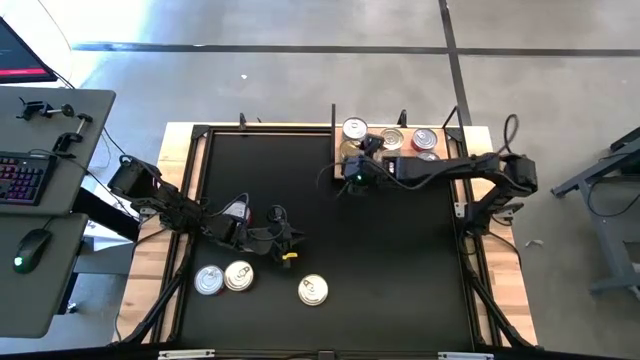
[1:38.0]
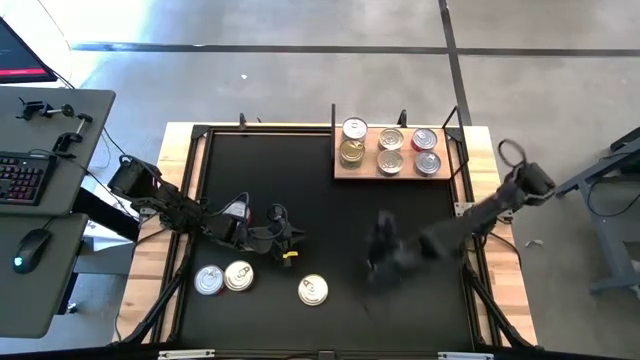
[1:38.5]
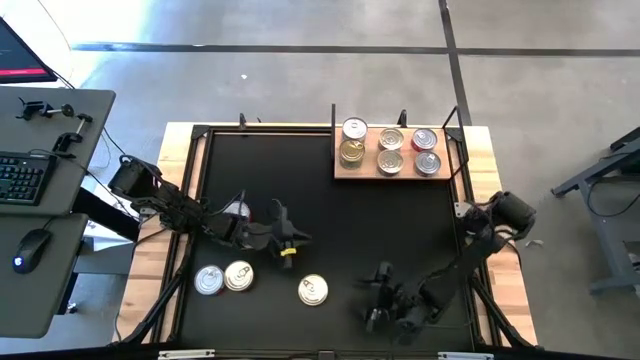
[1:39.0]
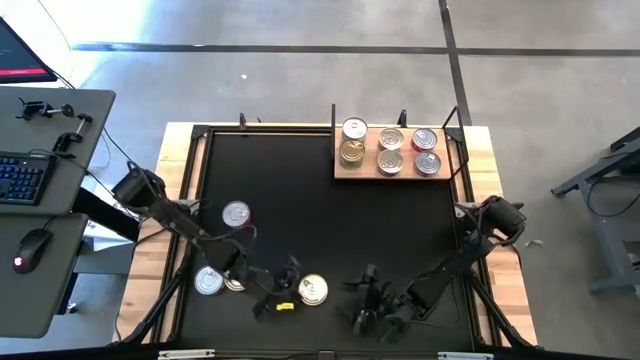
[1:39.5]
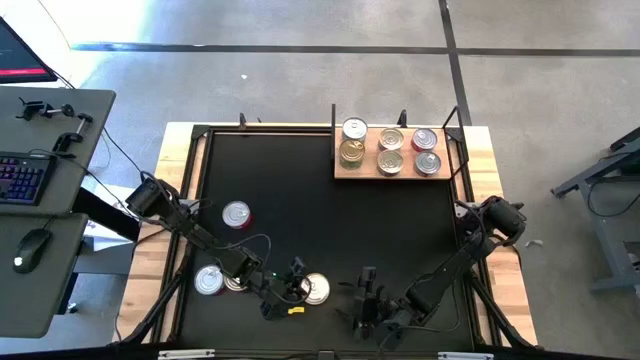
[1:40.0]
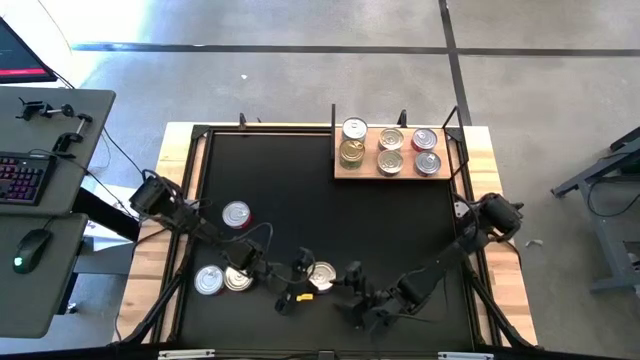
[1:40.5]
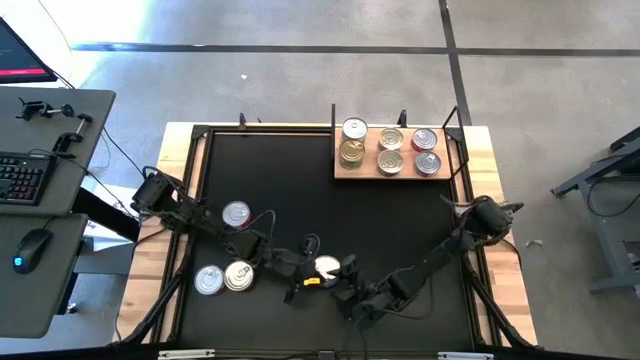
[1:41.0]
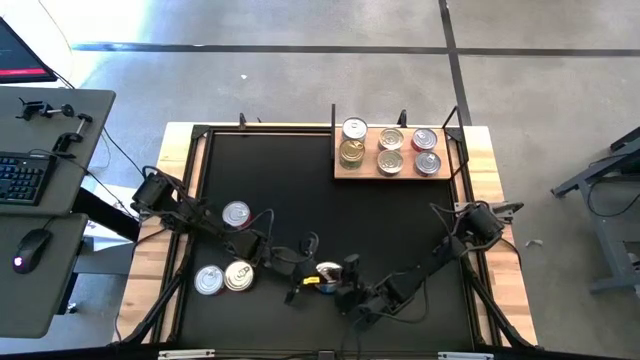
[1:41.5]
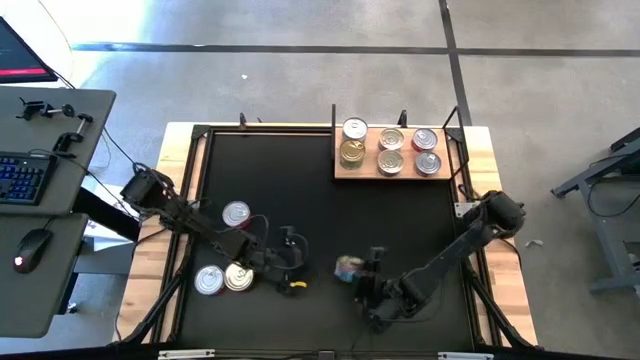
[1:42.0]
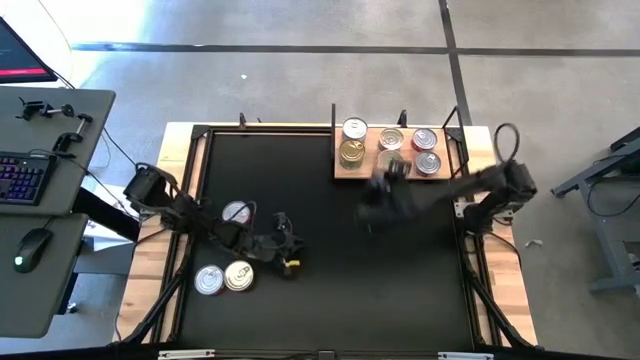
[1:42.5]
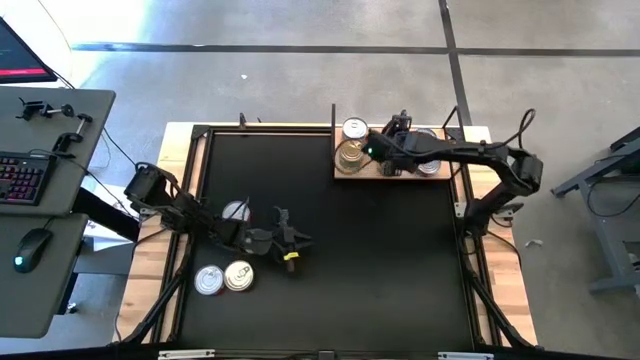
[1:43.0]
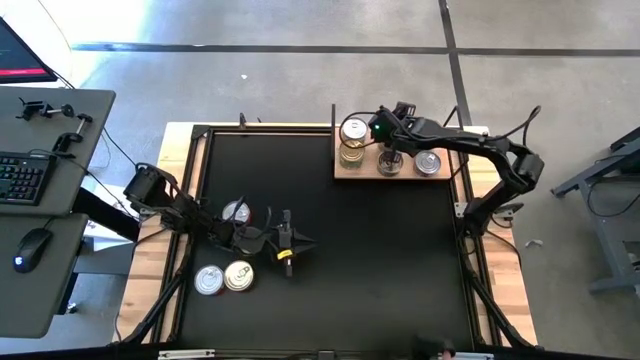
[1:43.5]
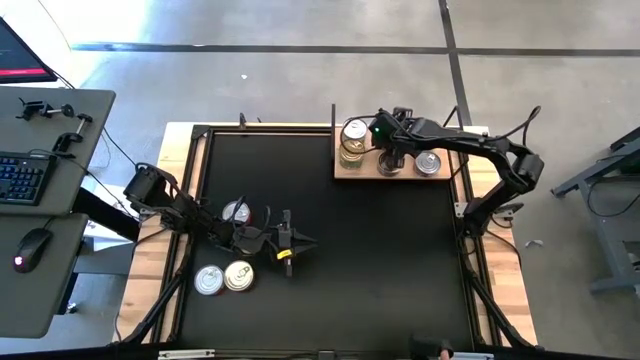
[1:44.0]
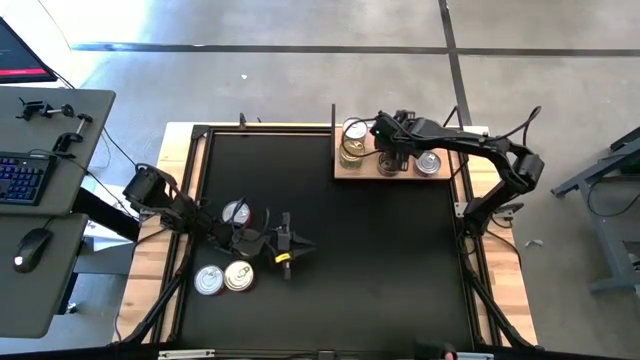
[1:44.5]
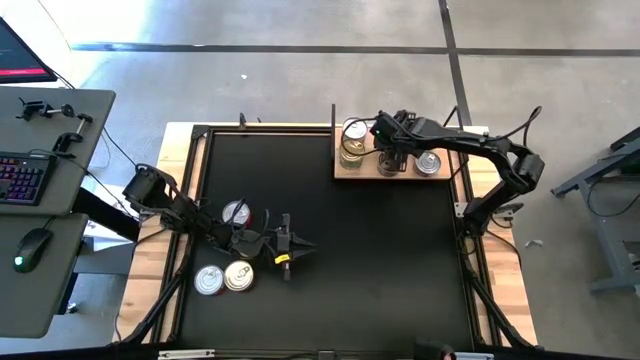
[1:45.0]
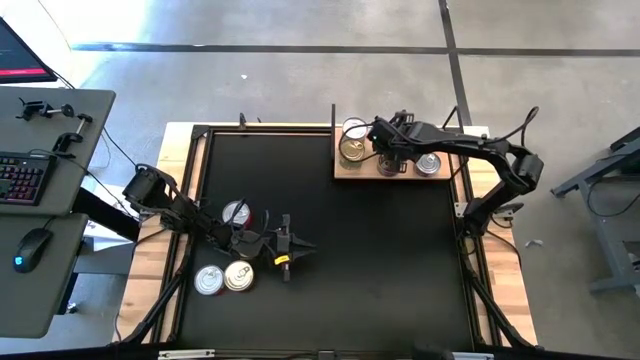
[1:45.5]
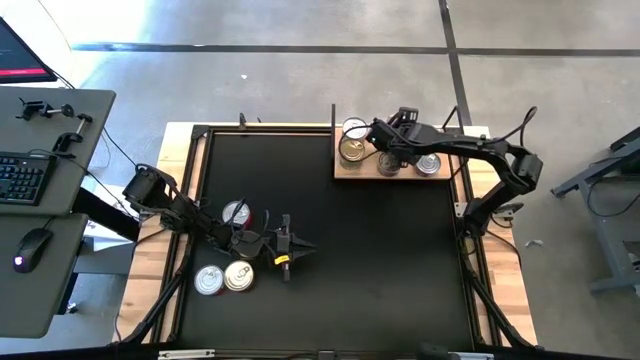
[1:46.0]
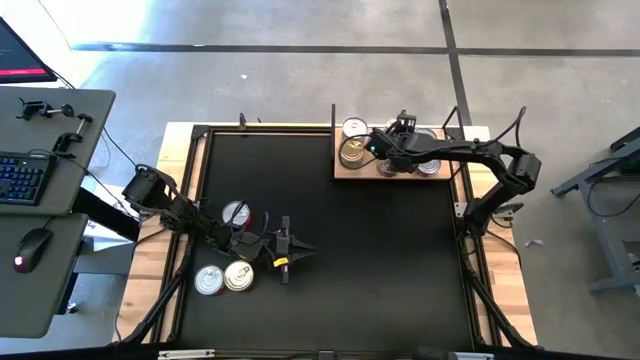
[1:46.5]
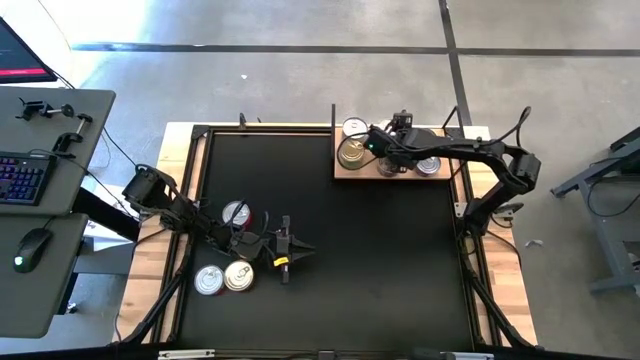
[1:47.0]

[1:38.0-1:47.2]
Task: Stack canned seafood by type on shelf
Stack the blue-pink tuna can on top of the other blue-pink tuna can on the shelf

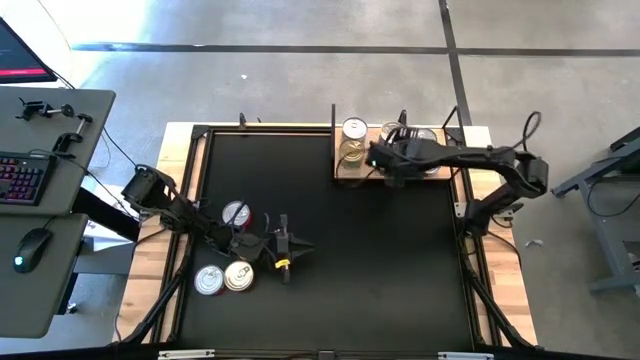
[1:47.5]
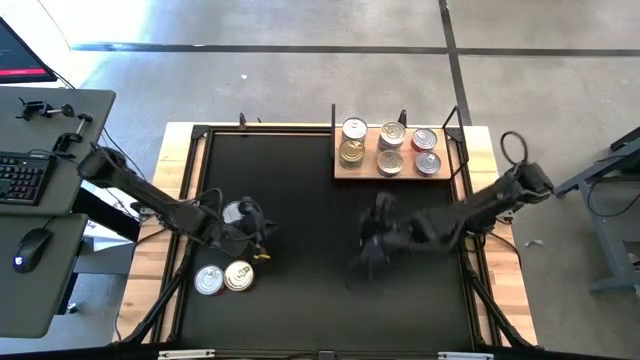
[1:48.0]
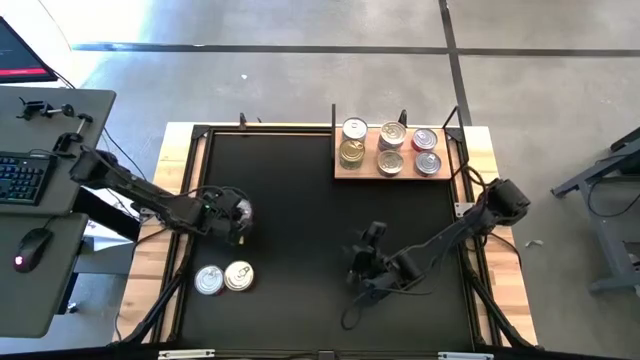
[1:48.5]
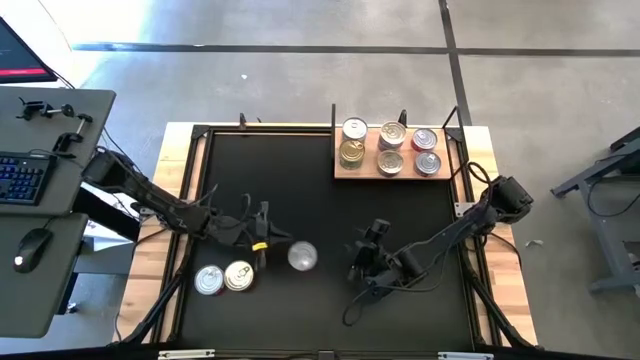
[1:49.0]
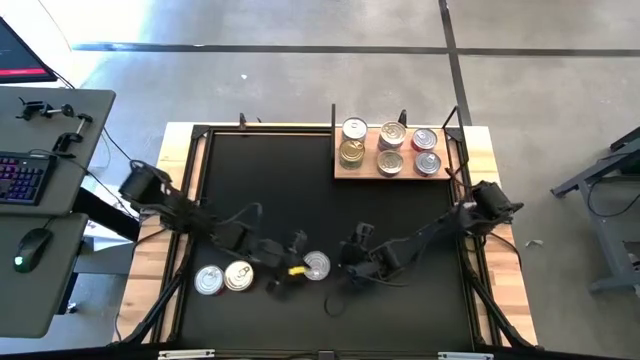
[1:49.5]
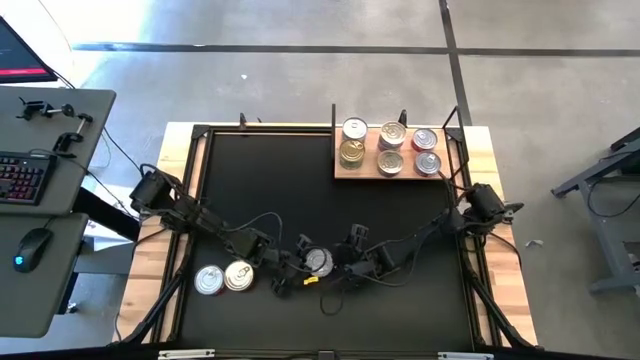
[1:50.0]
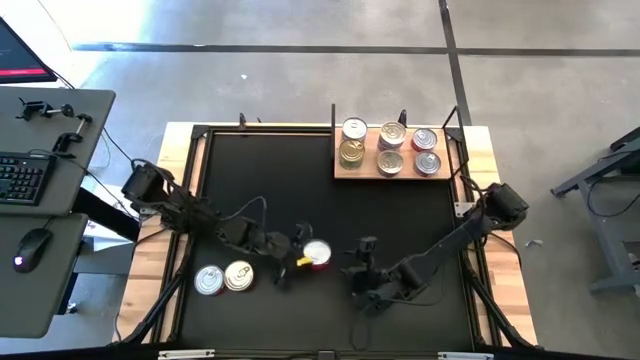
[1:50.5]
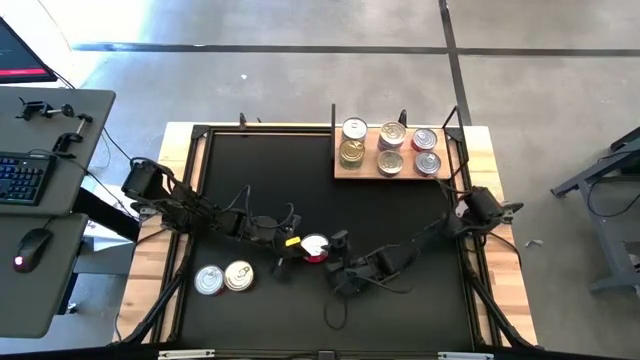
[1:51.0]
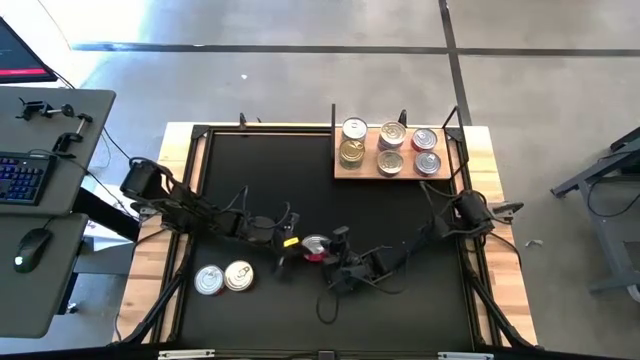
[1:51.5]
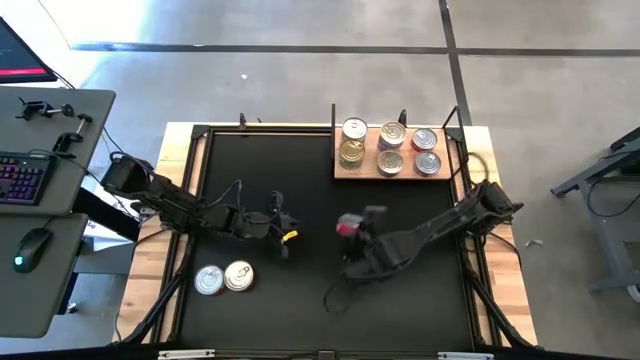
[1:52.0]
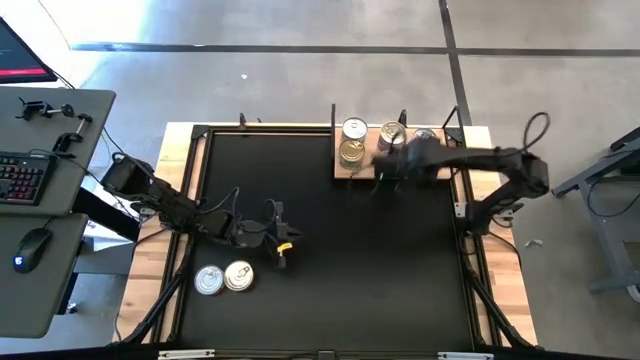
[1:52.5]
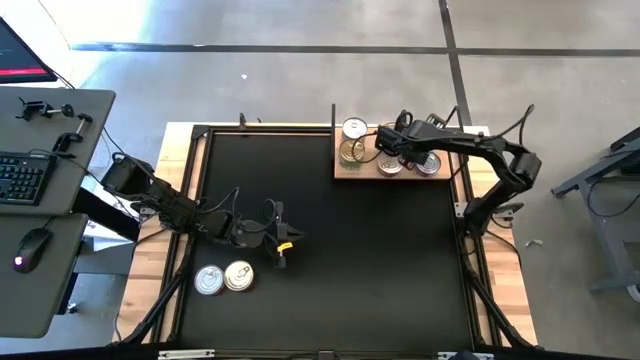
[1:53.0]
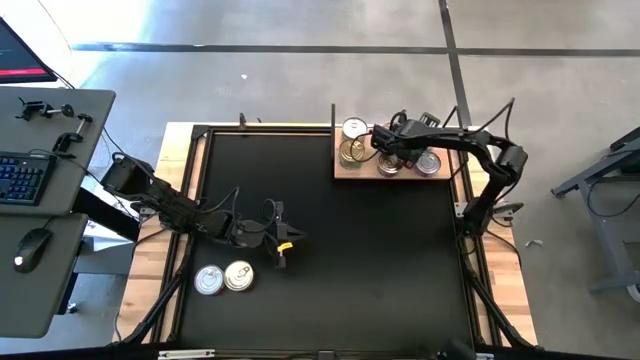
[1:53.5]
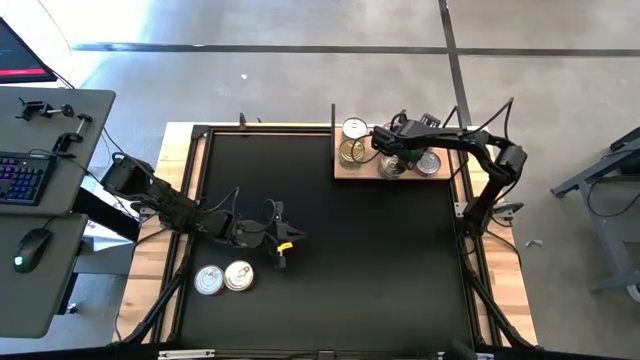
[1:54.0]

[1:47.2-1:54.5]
Stack the red tuna can on top of the other red tuna can on the shelf

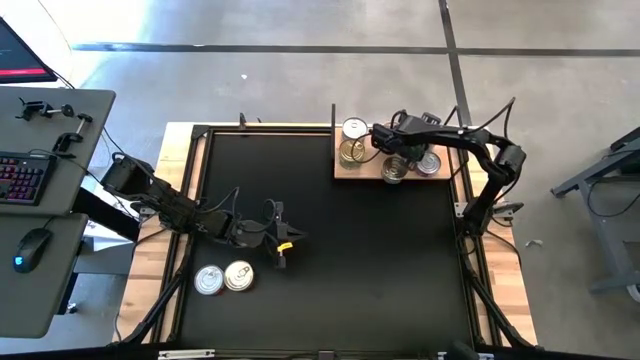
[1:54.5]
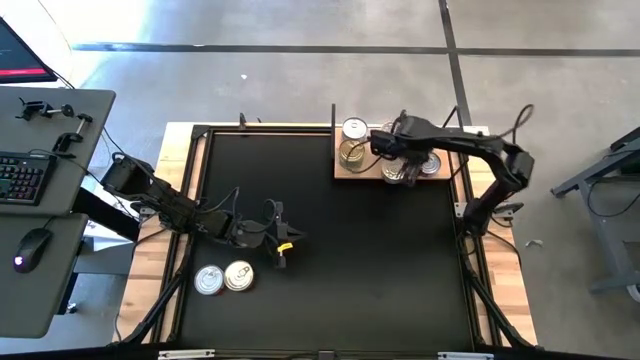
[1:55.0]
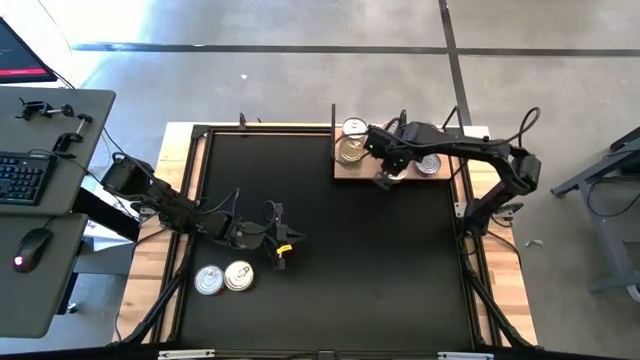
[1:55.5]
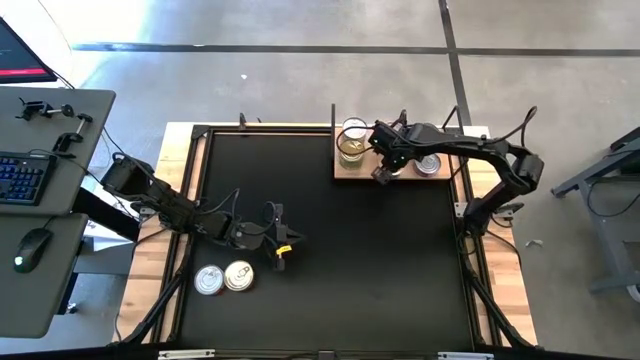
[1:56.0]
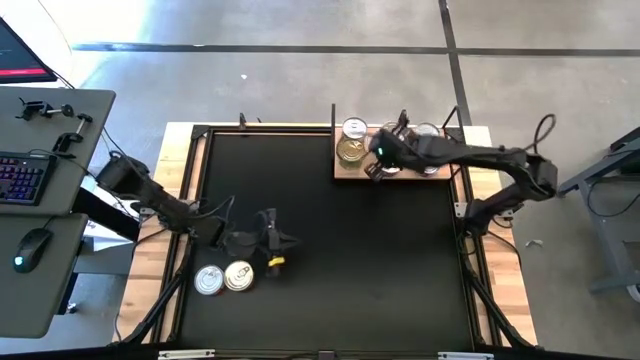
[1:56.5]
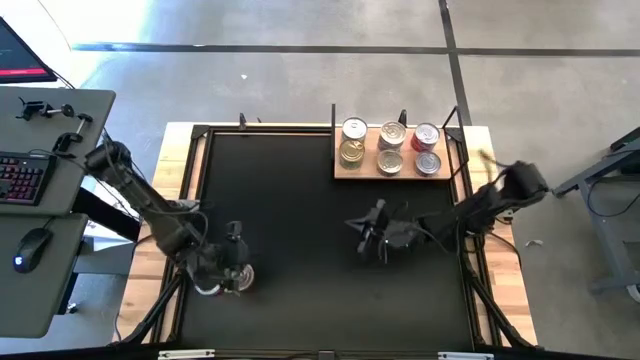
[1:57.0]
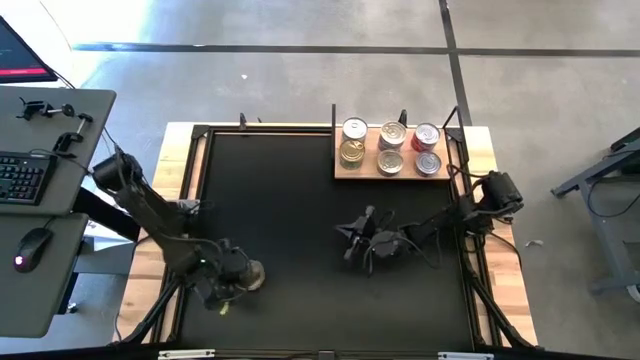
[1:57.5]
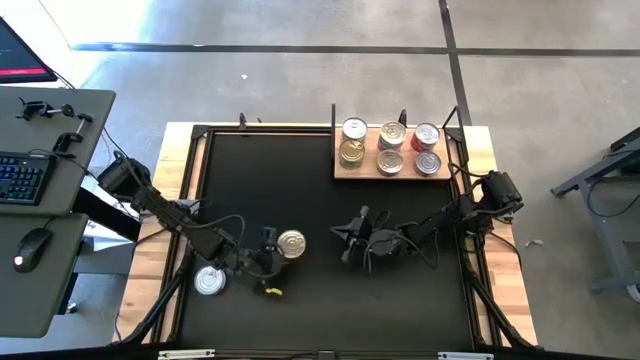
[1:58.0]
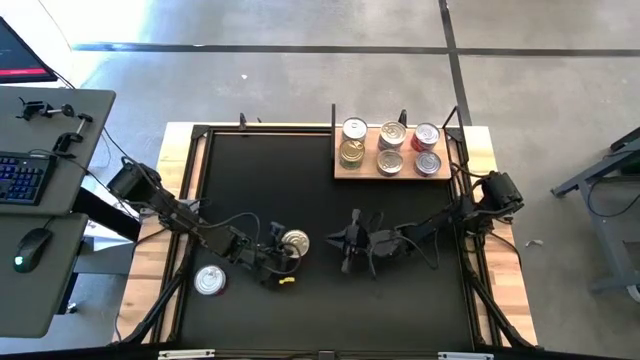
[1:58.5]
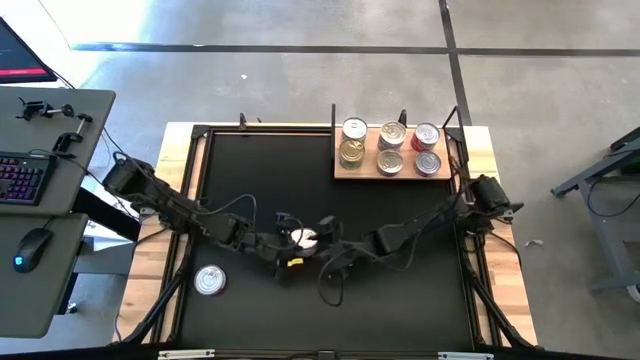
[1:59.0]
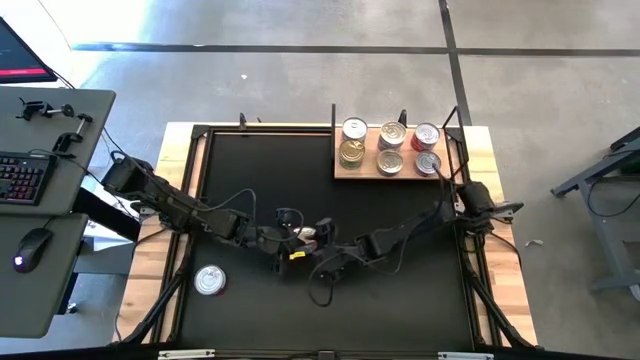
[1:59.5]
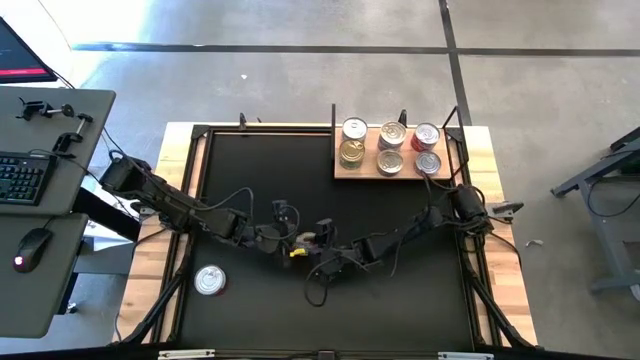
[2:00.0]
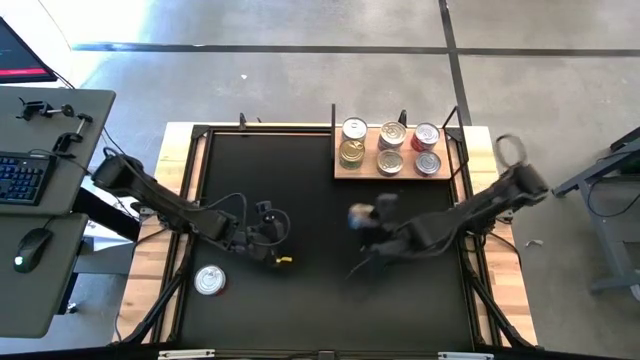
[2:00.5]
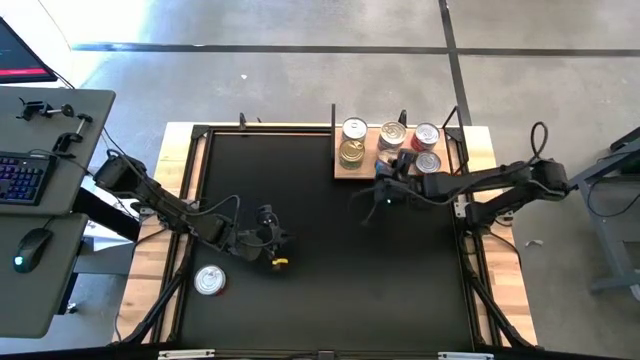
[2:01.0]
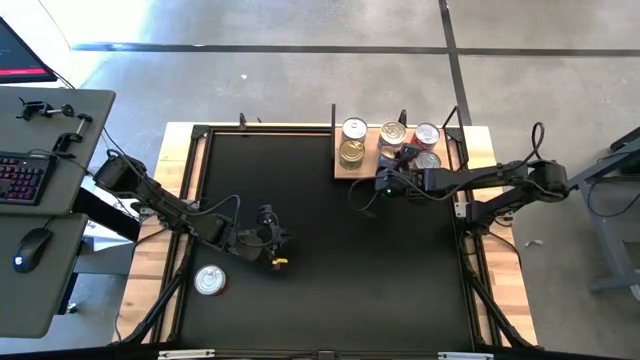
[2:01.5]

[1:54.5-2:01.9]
Stack the blue-pink tuna can on top of the other blue-pink tuna can on the shelf
